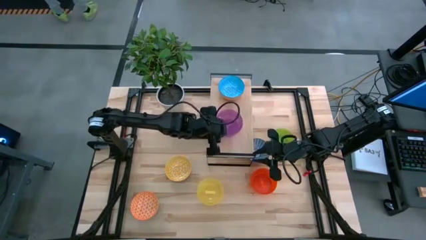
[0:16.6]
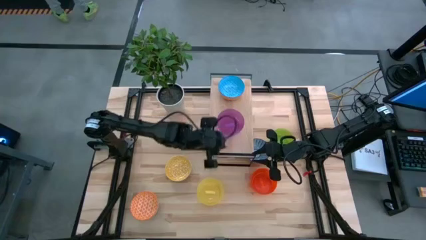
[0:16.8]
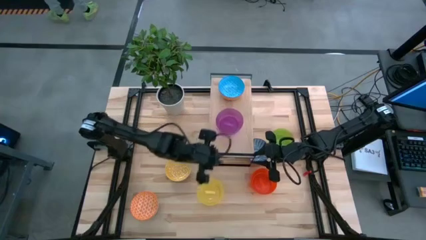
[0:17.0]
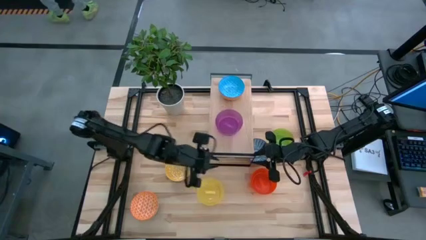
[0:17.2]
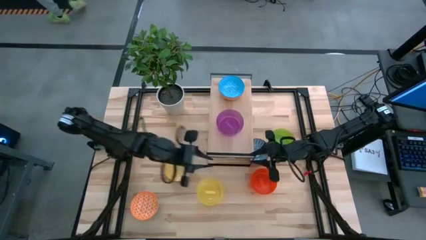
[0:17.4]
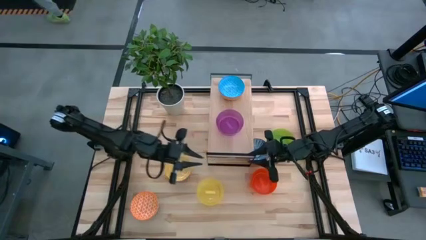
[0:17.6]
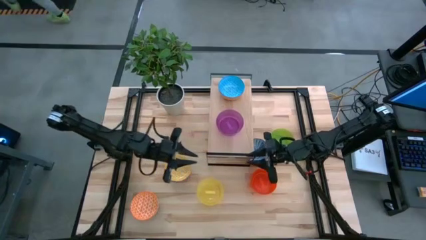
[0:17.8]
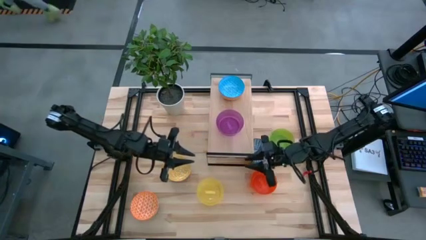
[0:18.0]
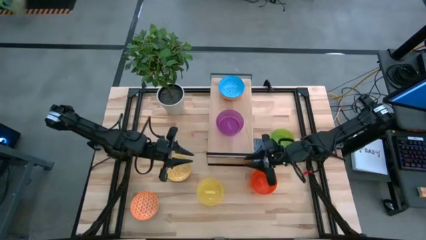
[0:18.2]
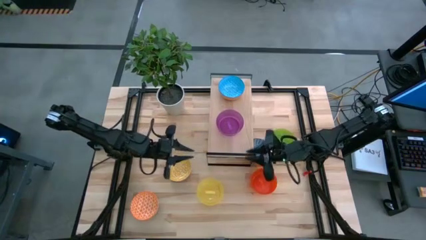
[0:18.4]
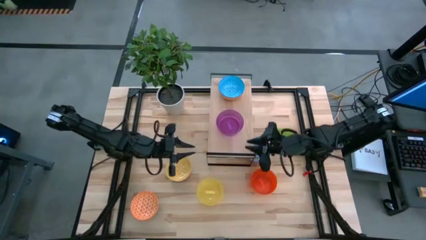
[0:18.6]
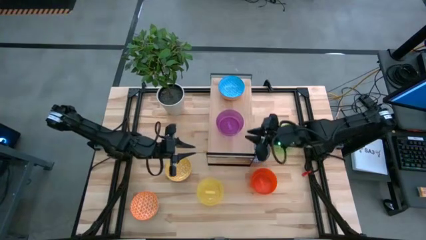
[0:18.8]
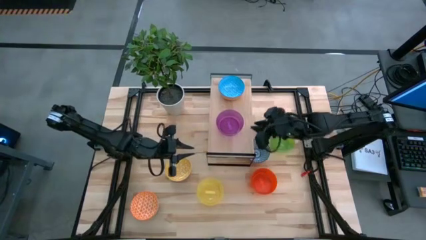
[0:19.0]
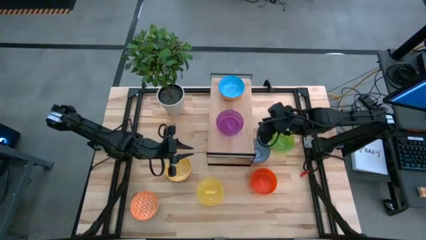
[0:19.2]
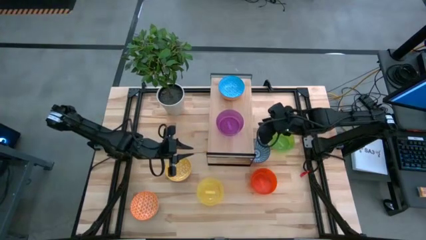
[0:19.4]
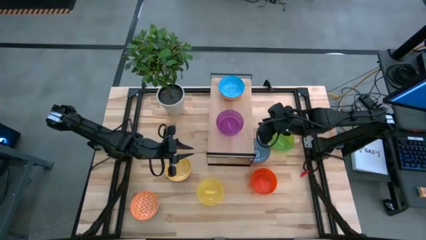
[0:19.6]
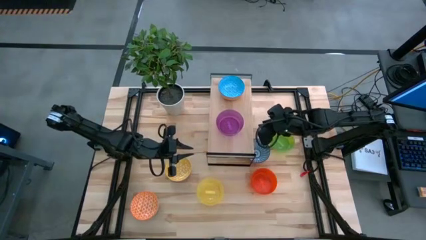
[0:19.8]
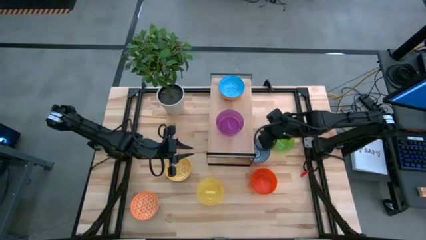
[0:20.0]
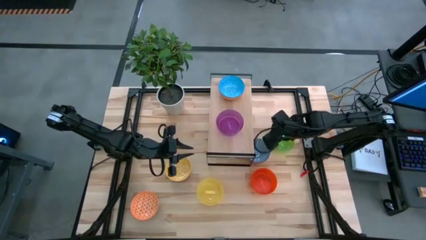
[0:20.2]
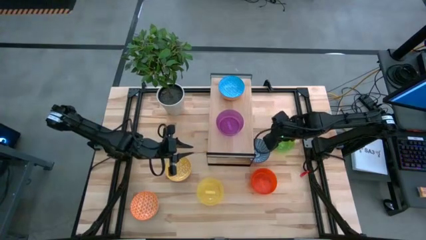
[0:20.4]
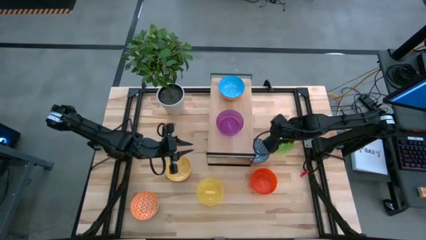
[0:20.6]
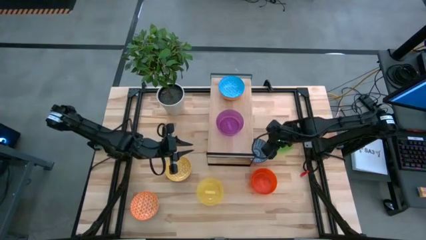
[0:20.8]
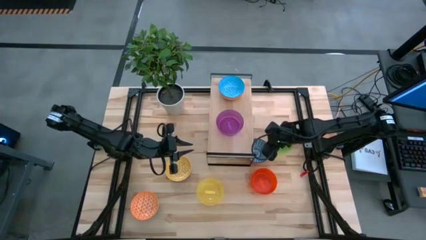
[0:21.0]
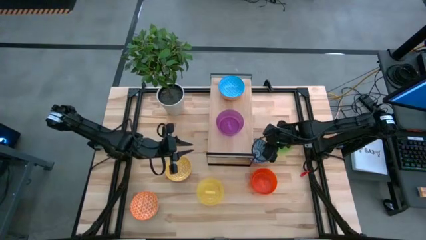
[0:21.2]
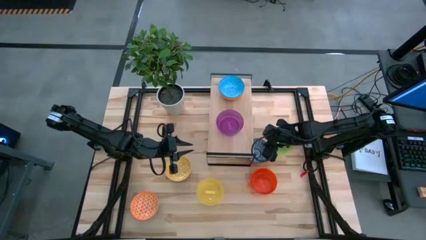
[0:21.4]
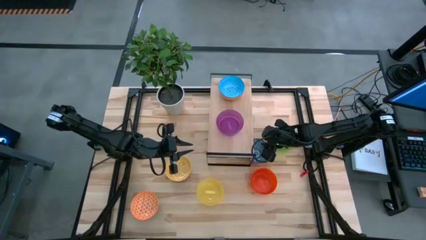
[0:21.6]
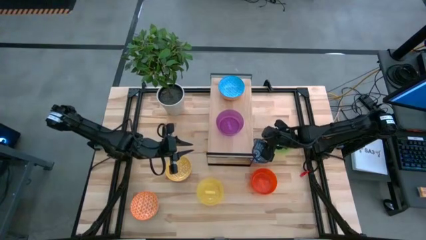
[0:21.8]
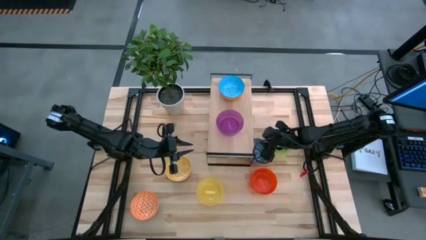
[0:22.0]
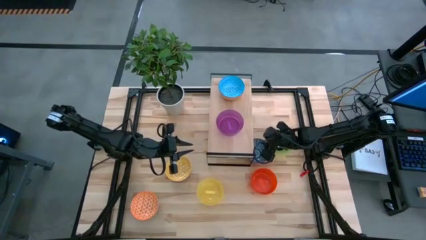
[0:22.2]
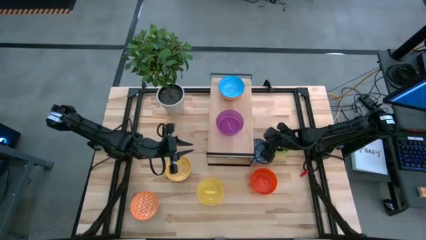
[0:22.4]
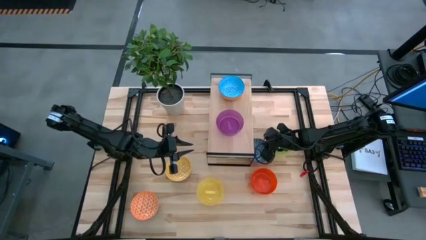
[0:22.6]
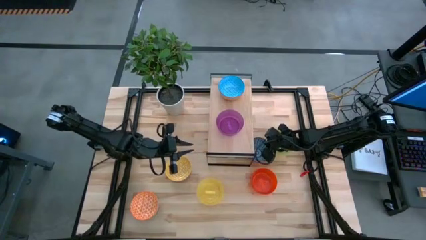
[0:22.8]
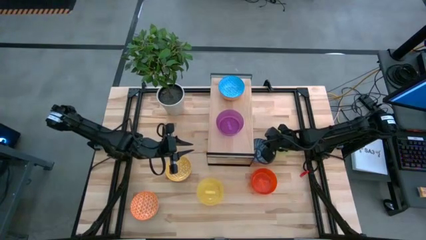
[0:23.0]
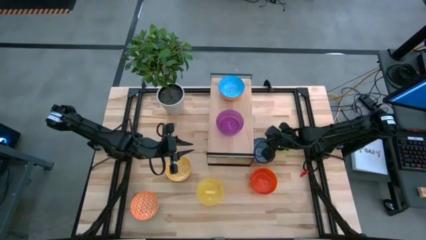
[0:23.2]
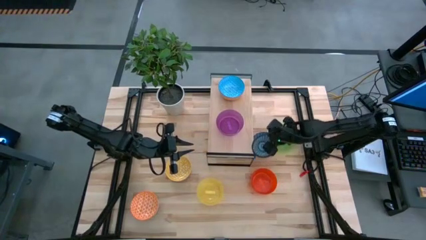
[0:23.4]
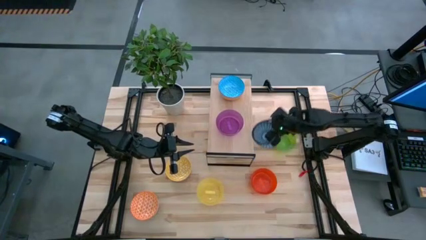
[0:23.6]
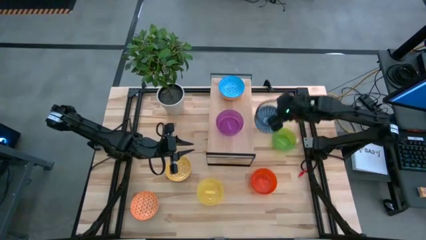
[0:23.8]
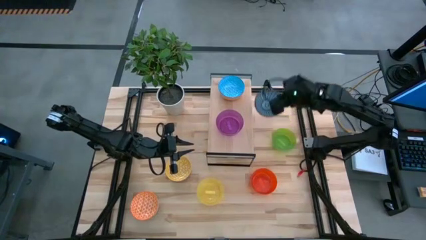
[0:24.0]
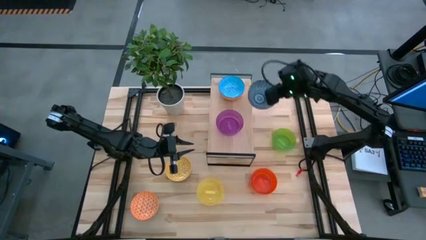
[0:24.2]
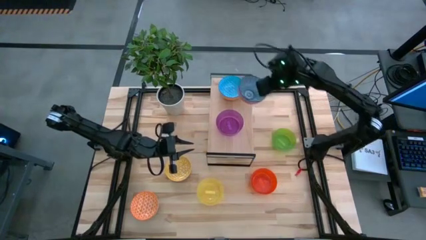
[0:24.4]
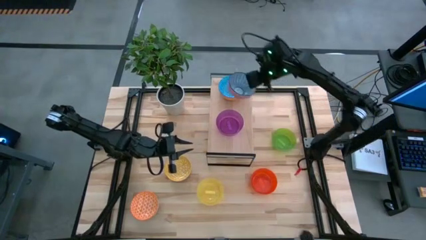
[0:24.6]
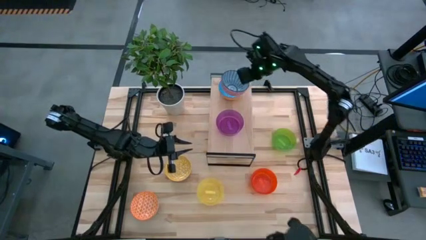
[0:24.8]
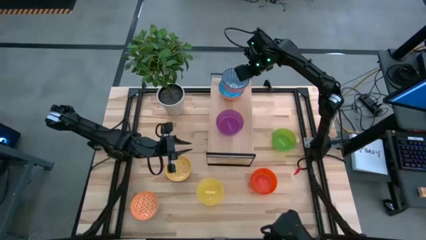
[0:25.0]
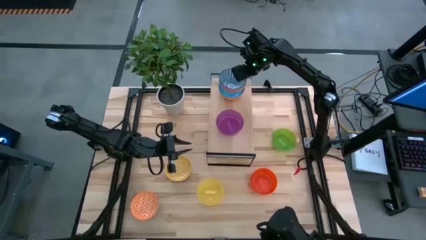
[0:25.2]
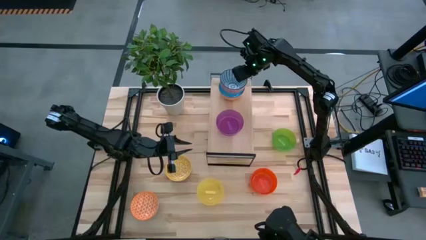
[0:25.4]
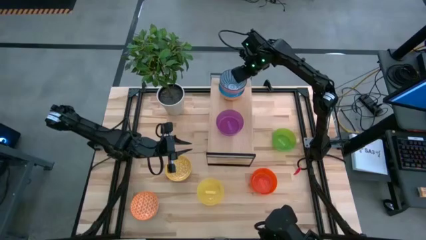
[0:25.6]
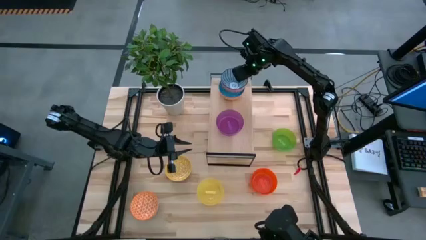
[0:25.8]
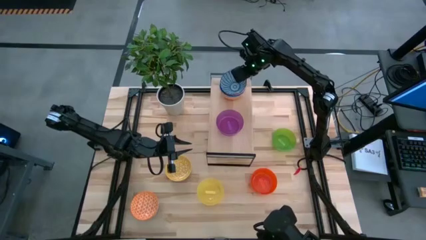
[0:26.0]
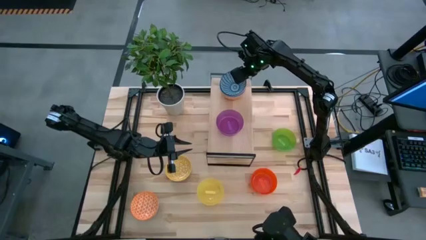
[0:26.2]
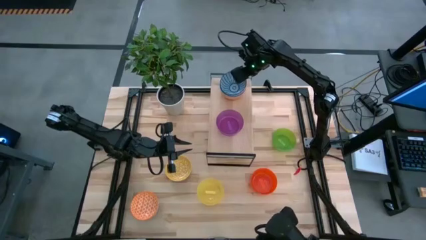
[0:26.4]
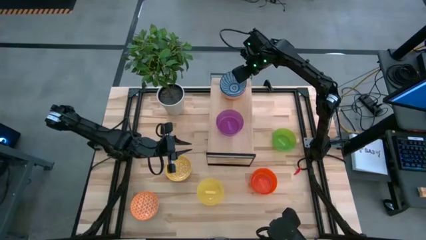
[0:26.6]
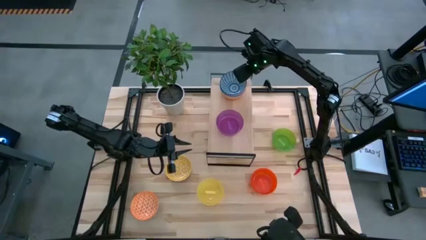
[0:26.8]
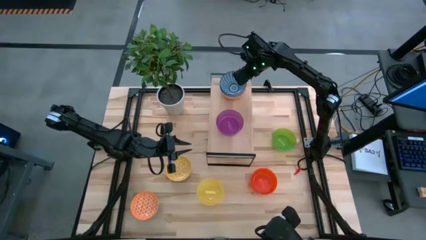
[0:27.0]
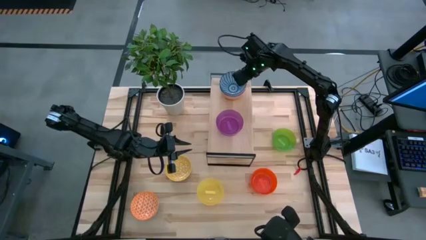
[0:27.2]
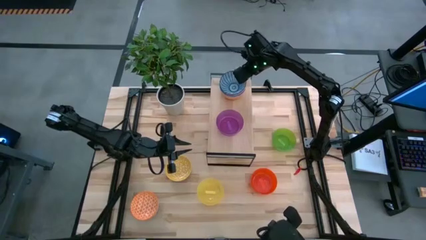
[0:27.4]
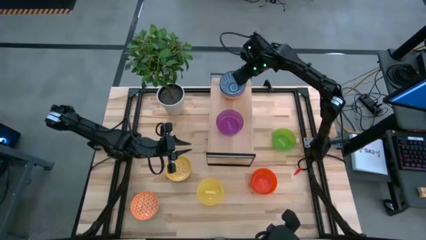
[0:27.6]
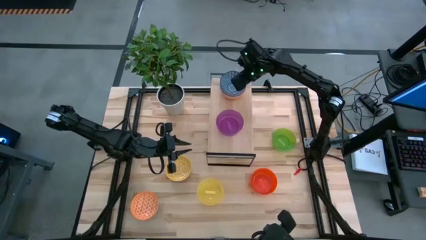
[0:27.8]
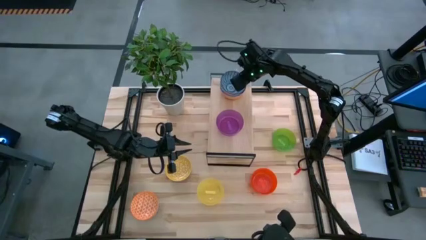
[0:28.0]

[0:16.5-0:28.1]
Task: Place and stack bowls onto a shelf
Stack the dark blue patterned bowl on top of the blue patterned bowl on the shelf

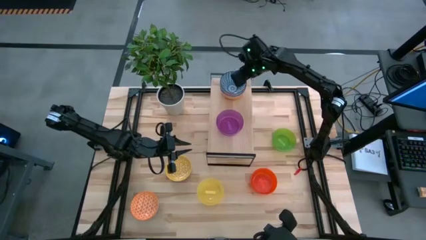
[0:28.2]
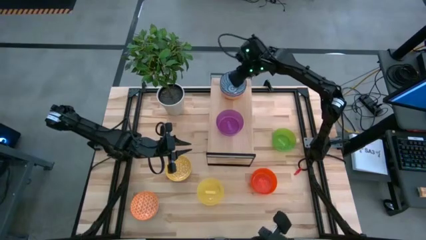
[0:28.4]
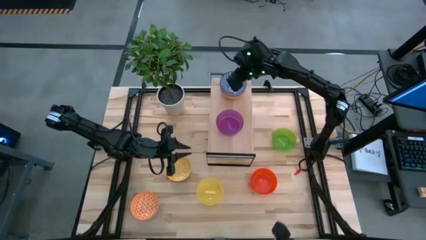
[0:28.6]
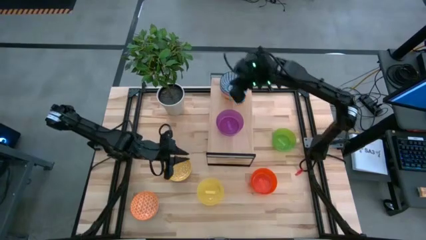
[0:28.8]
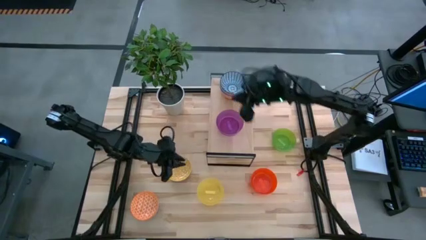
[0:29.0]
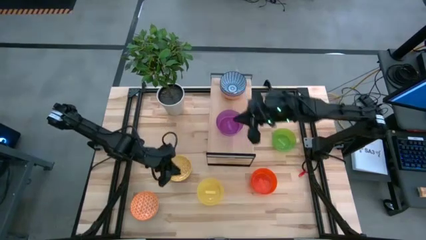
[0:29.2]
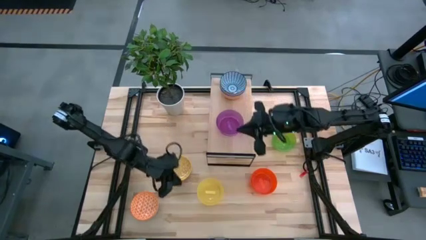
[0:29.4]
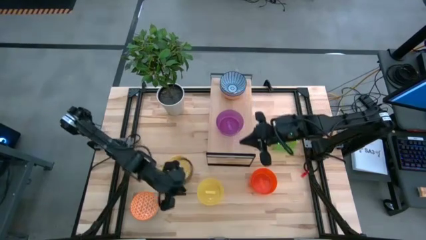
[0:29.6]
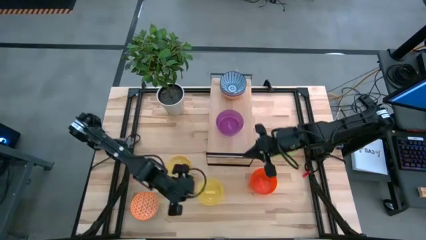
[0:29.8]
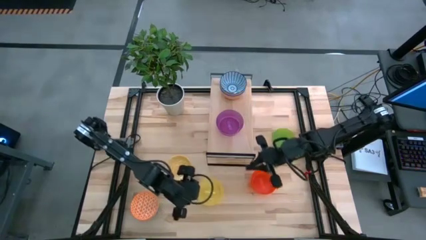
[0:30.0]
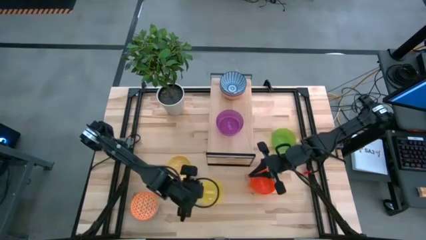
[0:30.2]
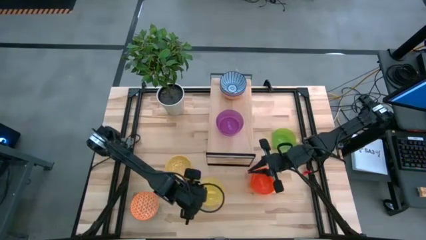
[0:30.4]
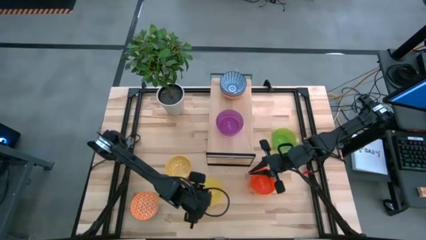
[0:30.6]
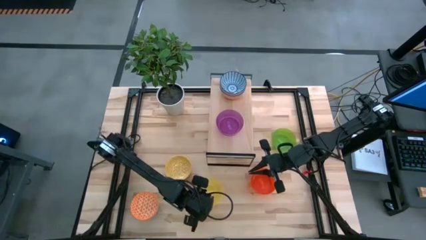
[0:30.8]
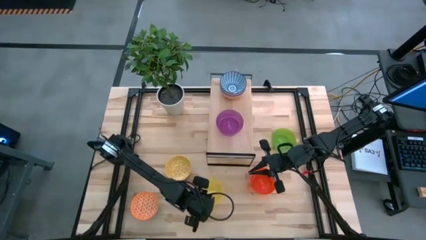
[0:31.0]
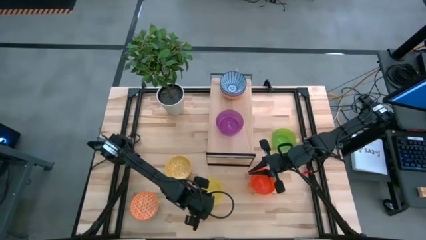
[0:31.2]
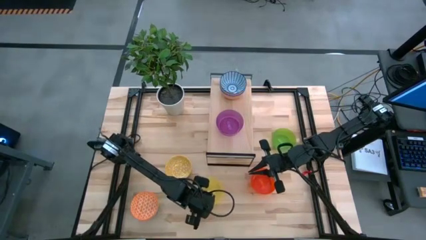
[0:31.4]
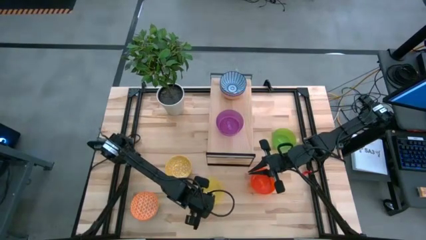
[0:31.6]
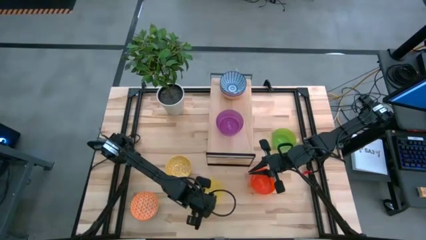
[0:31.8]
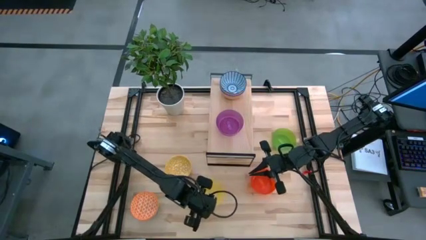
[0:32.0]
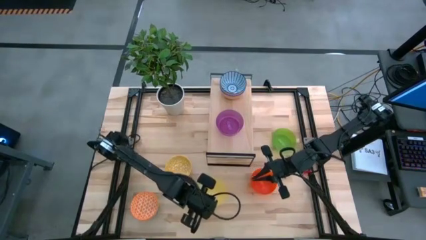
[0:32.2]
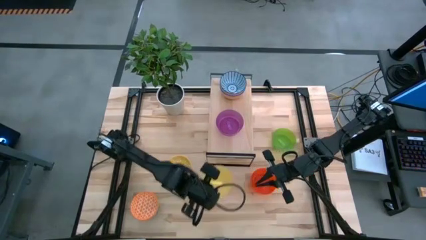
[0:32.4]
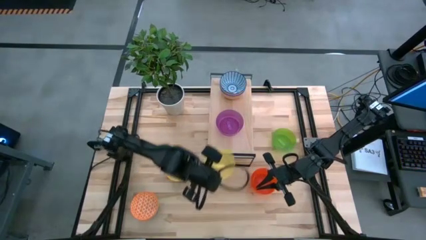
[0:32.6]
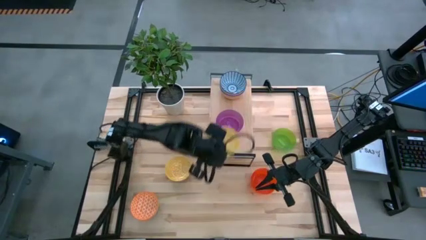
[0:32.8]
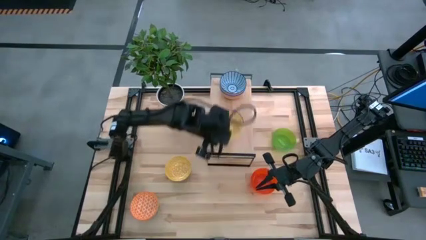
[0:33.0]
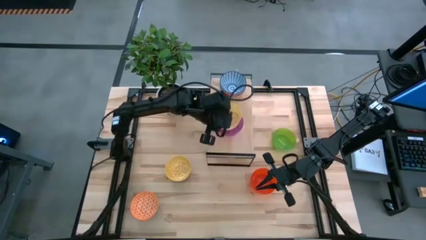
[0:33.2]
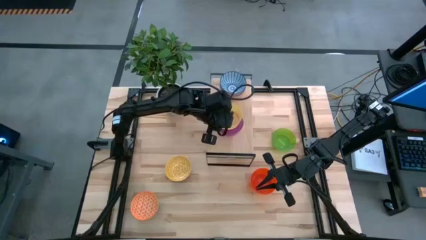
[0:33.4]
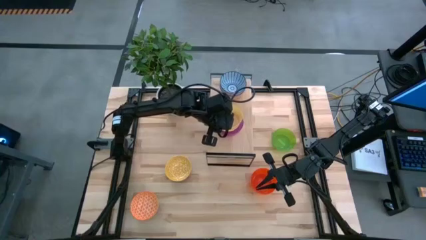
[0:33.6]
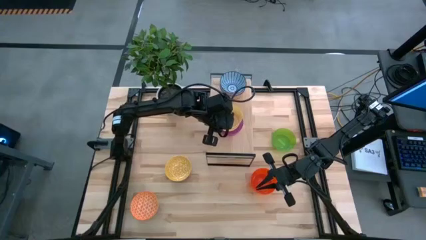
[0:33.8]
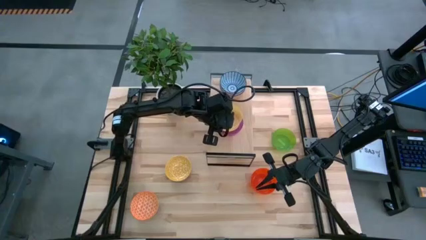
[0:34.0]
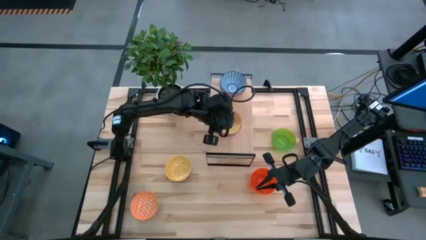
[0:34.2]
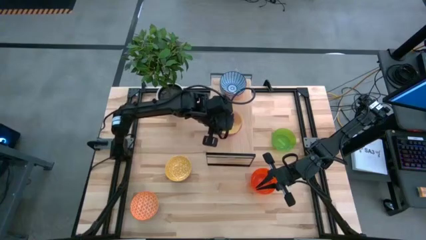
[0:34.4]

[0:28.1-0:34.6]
Stack the yellow bowl on top of the purple bowl on the shelf
